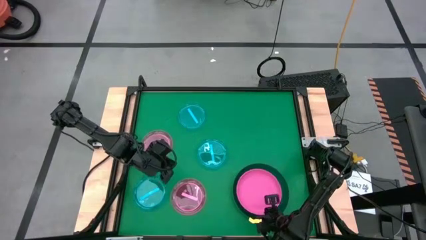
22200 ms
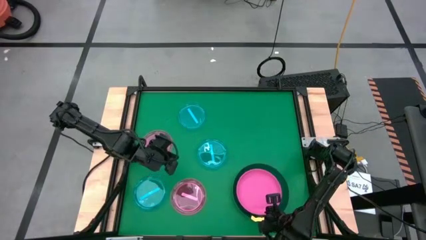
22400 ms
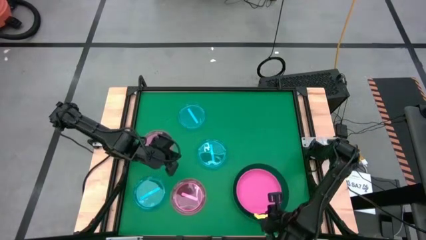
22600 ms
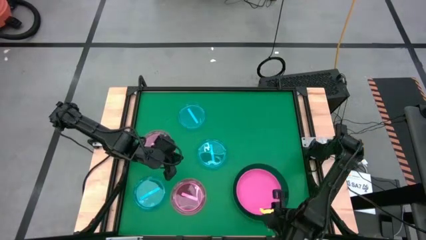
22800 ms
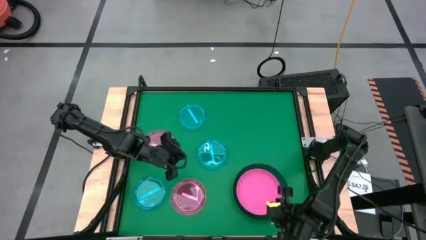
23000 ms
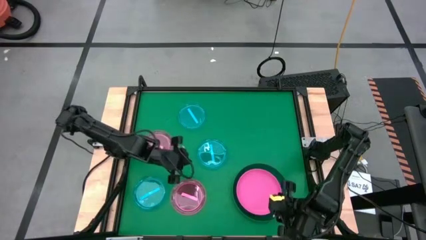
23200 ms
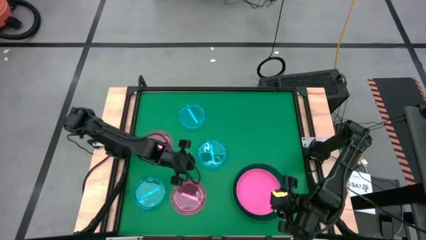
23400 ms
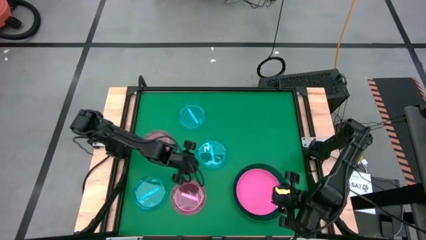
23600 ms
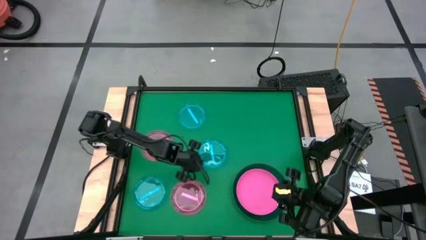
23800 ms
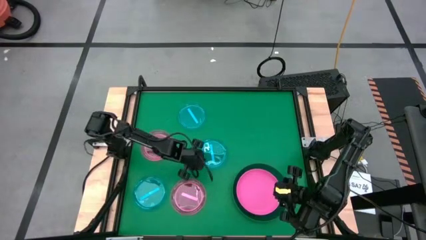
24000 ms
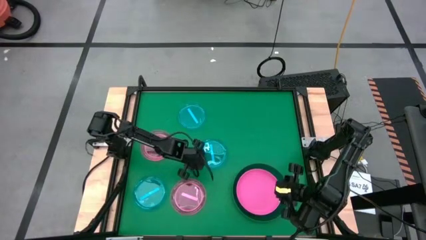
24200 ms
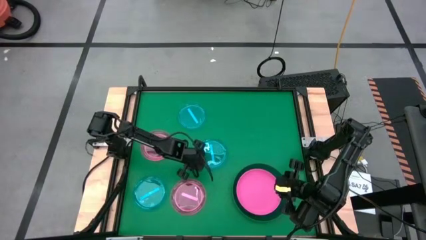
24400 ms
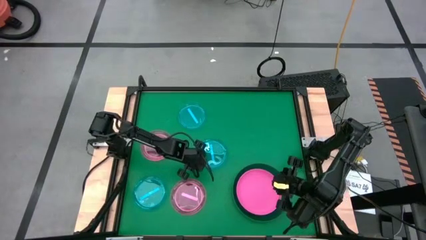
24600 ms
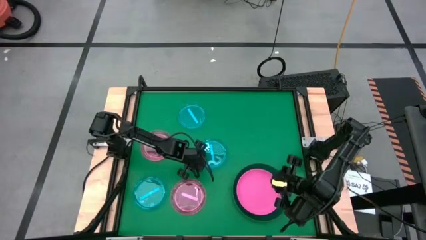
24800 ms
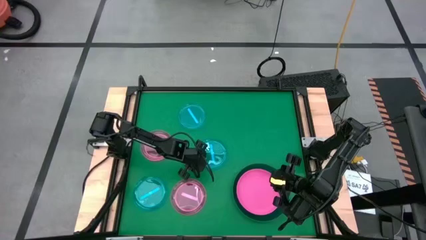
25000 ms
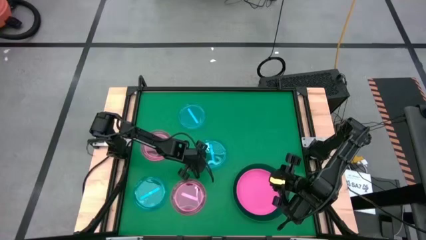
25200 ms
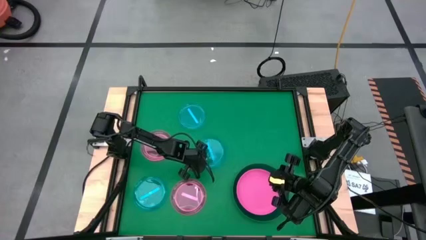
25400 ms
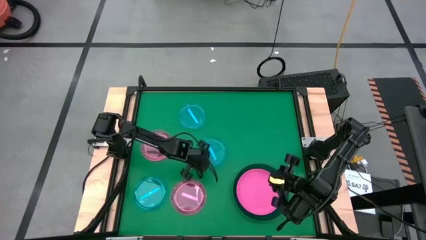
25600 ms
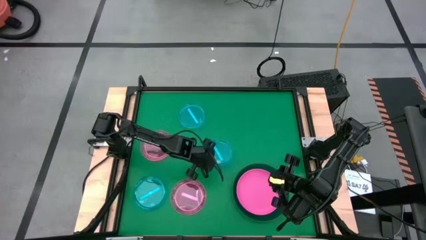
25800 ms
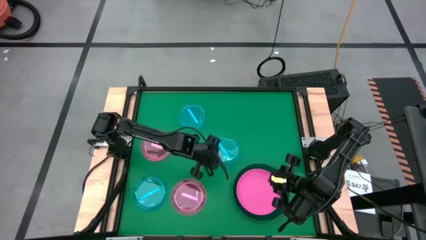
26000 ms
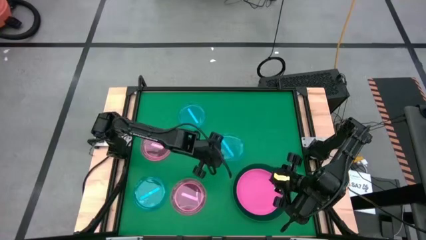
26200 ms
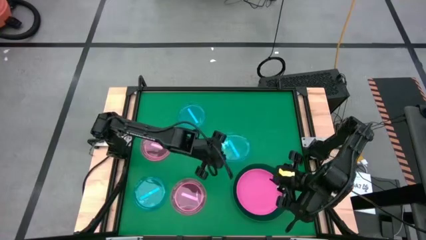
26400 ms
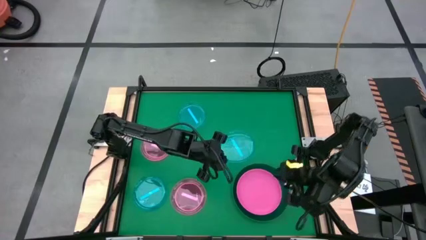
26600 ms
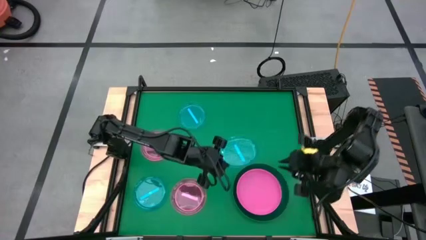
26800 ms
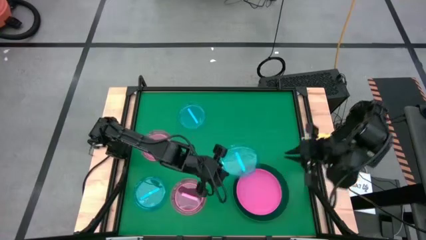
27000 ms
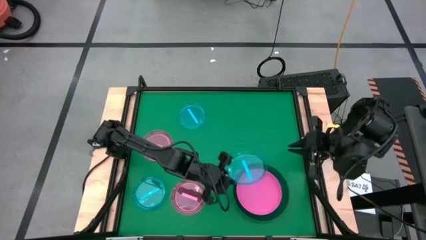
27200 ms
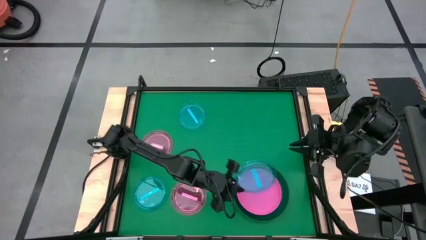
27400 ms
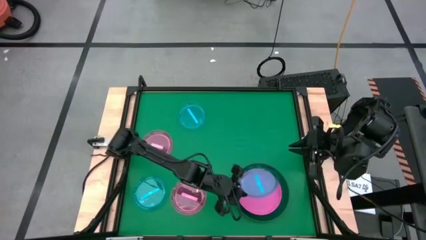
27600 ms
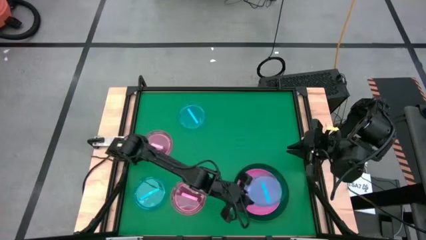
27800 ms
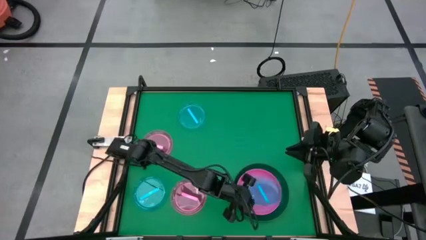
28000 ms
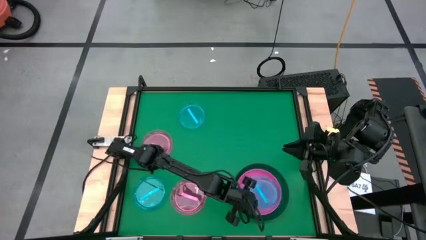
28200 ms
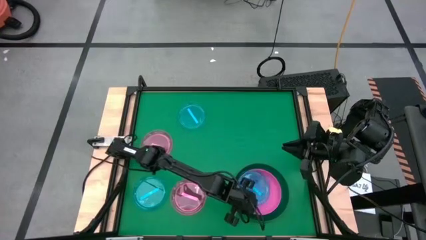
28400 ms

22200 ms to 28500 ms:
Task: Stack plastic plates
Stack the middle blue plate on top of pink plate

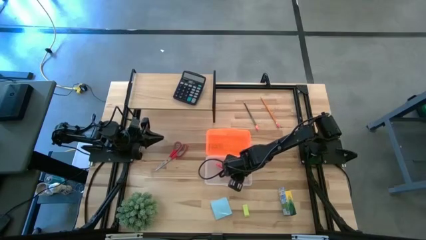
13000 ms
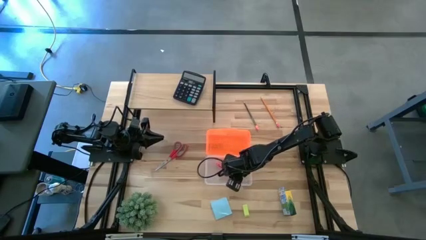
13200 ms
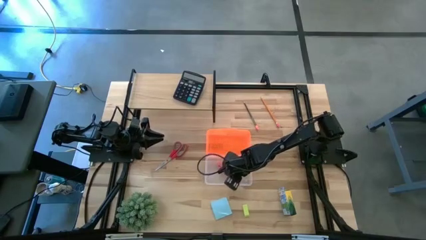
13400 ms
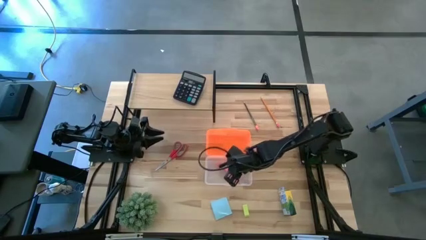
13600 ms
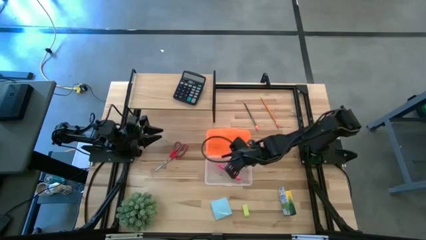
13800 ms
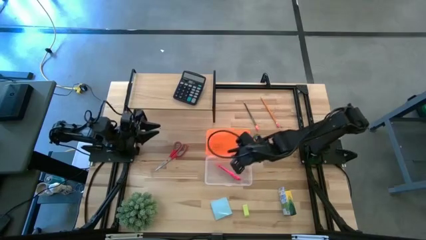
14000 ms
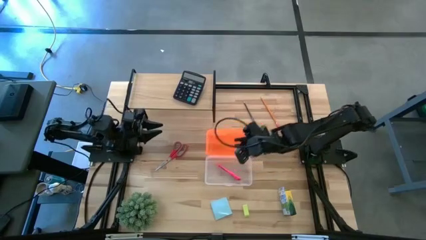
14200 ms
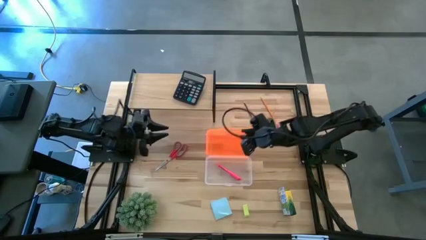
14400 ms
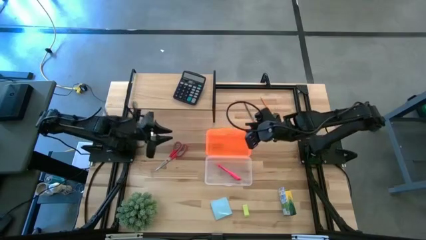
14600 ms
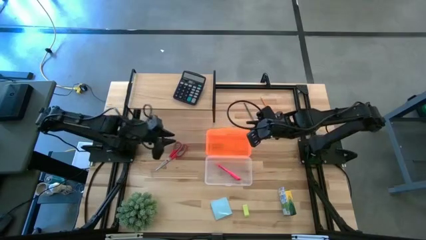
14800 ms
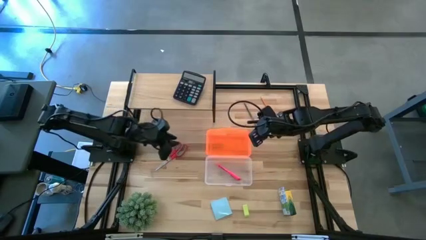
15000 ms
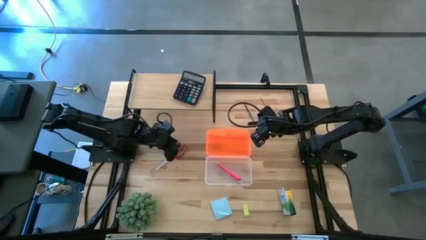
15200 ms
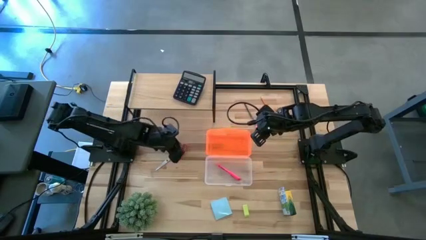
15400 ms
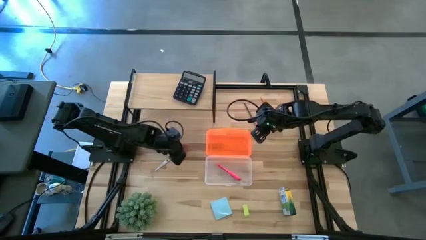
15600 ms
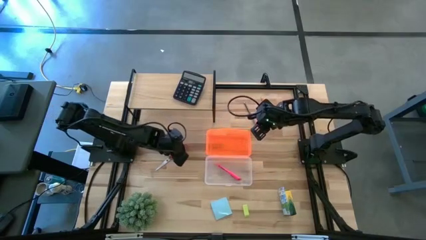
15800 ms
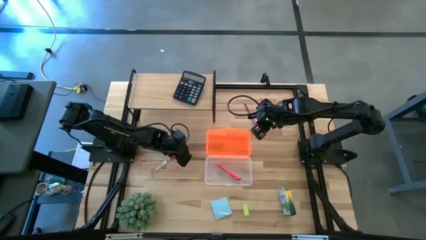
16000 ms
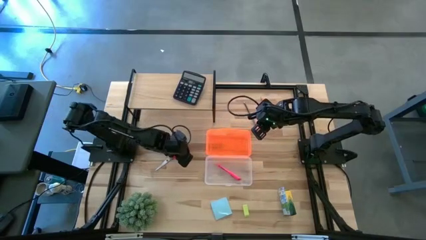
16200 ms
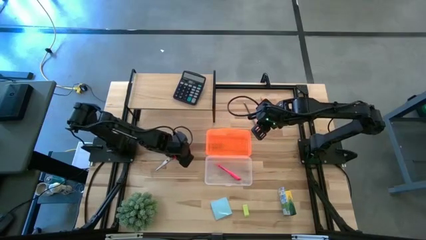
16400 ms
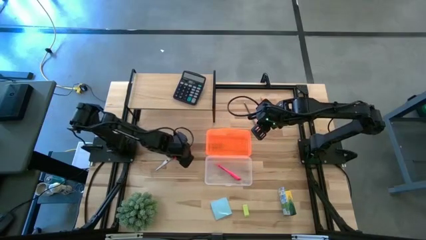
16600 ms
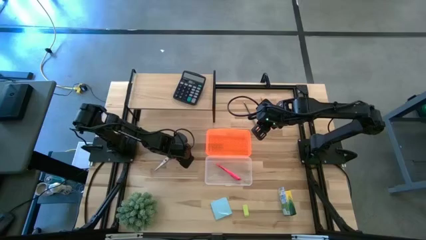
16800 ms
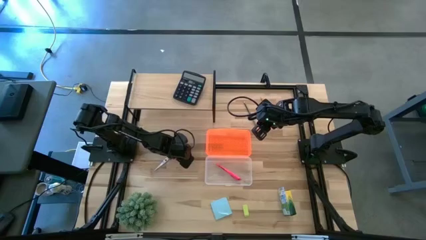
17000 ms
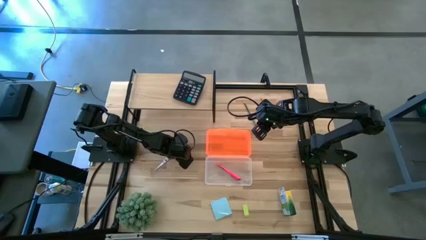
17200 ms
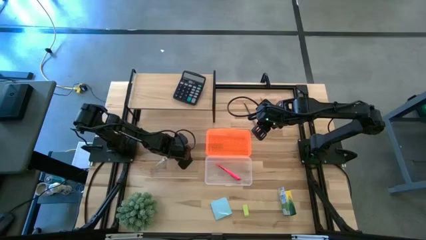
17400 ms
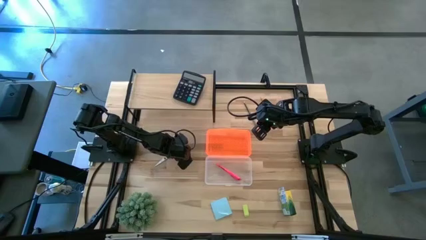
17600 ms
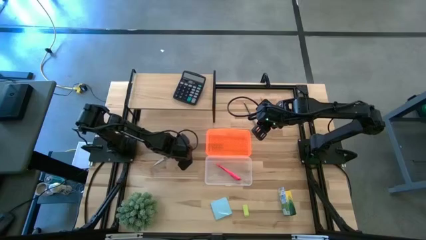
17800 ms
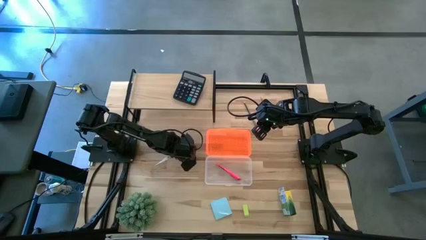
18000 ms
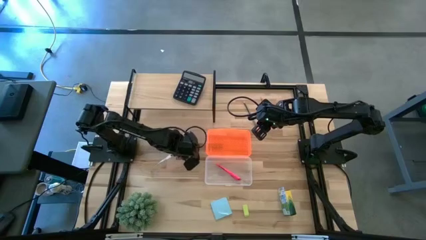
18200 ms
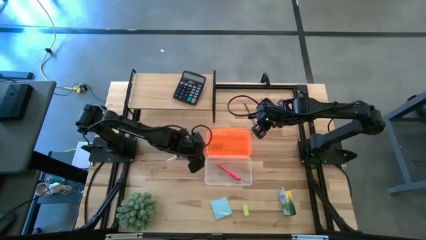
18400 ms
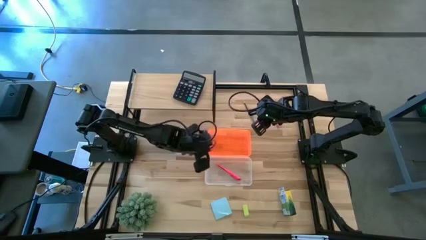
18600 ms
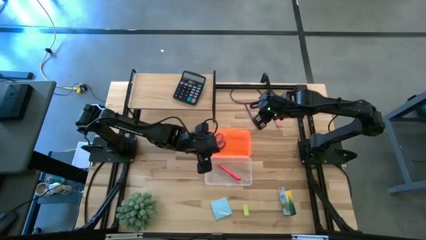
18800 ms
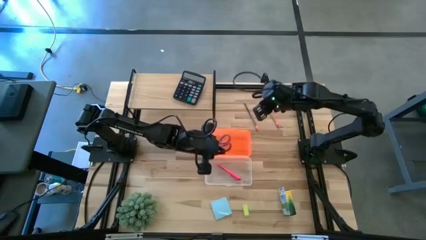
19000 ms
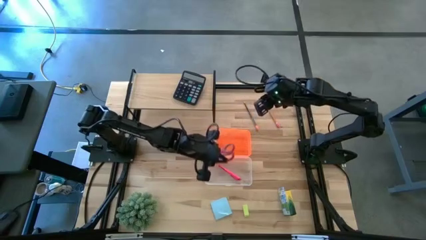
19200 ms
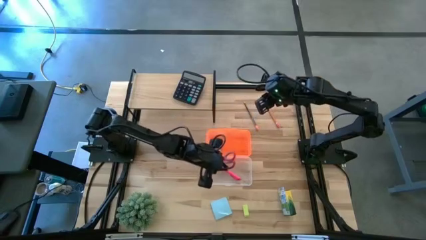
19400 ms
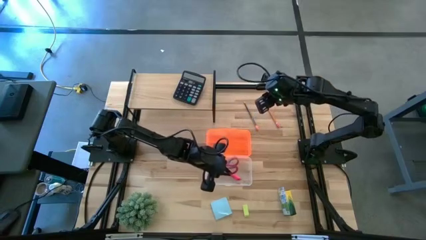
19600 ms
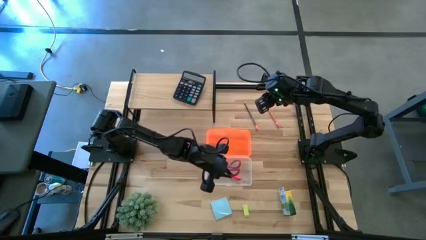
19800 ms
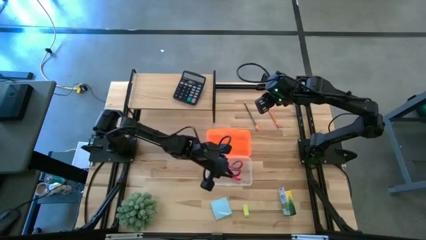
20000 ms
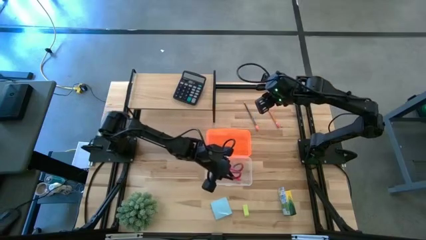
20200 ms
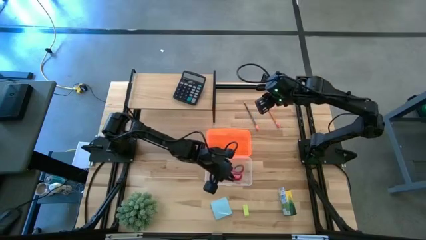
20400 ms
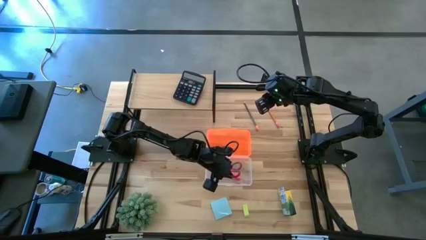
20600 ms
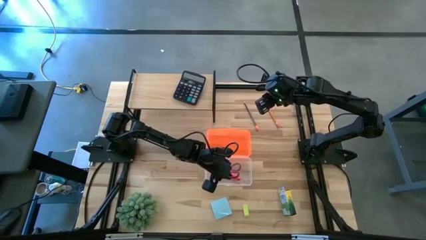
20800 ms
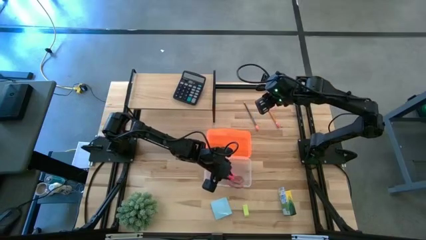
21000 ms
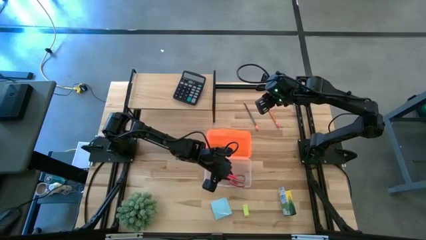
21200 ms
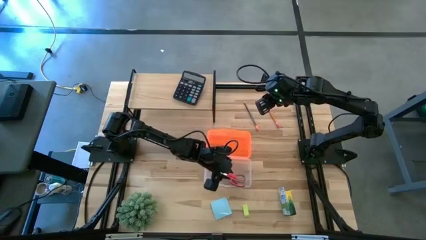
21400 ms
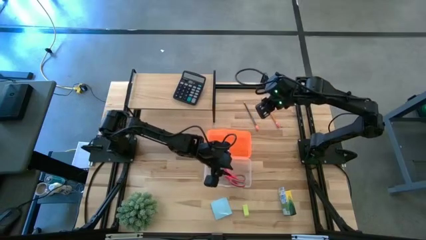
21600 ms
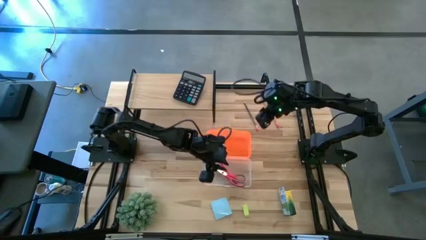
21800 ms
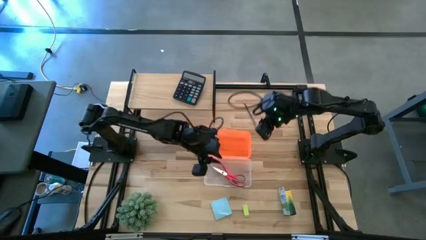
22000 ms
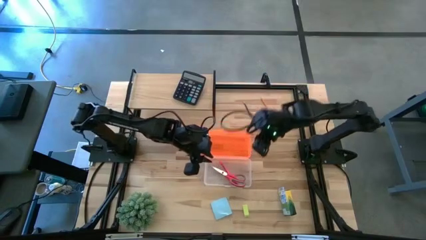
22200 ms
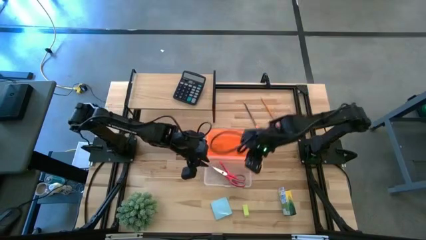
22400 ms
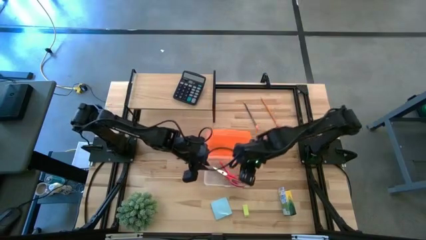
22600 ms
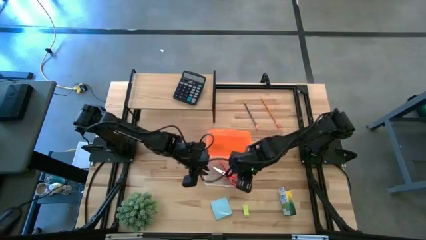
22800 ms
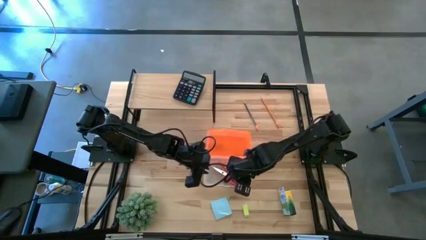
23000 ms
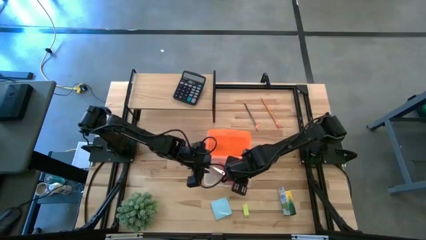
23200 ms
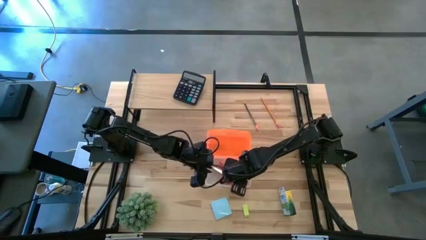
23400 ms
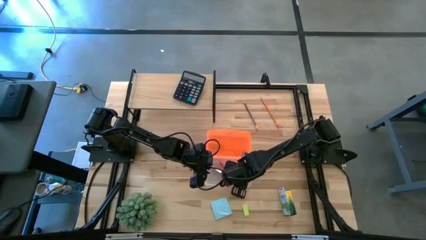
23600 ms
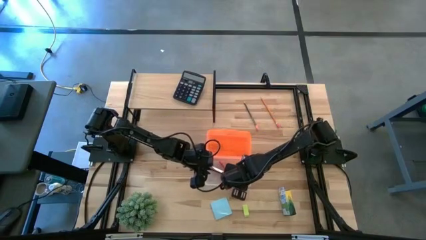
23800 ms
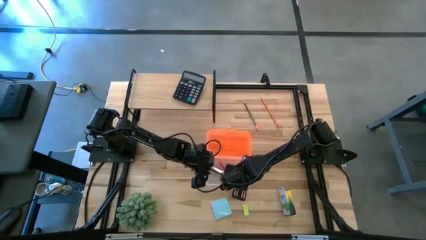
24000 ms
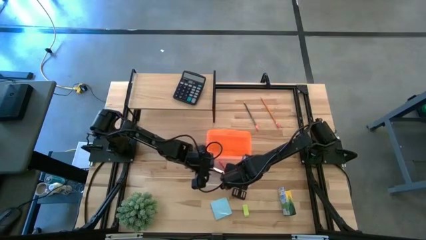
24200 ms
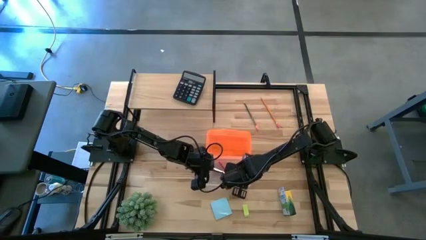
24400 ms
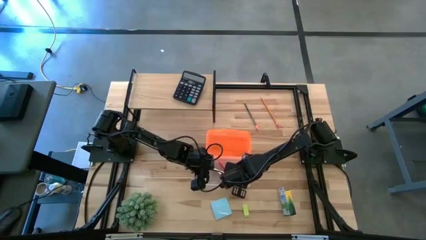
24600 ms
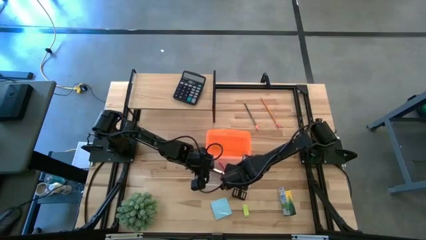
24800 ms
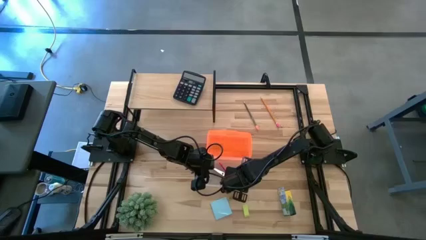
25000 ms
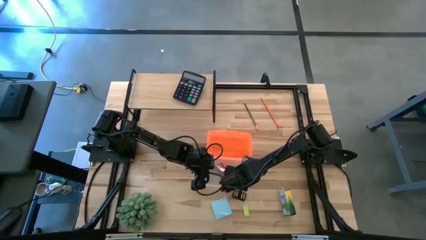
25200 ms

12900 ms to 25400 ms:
Task: Pack school essentials
Put the scissors into the supply box
